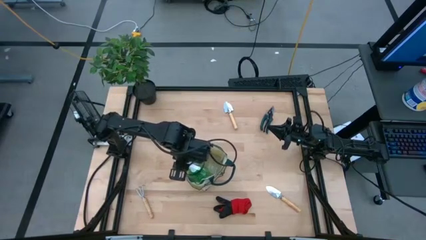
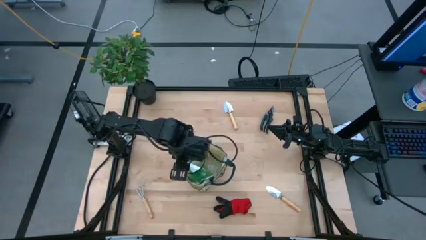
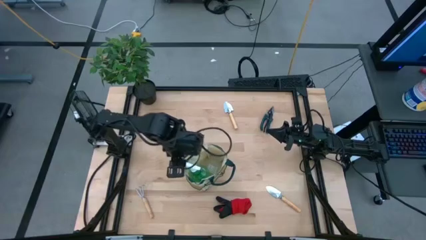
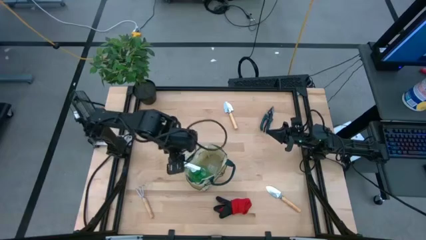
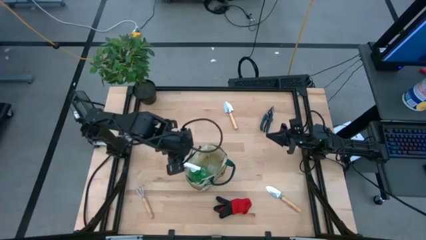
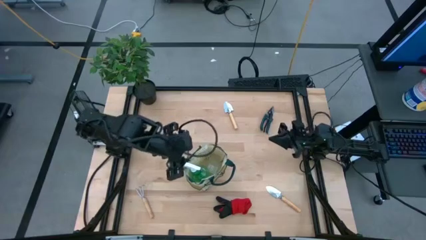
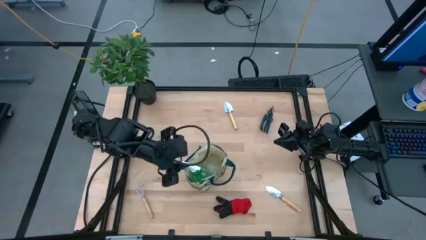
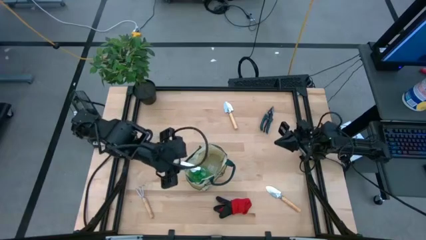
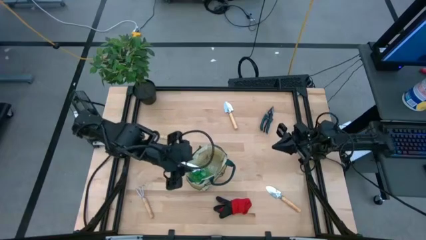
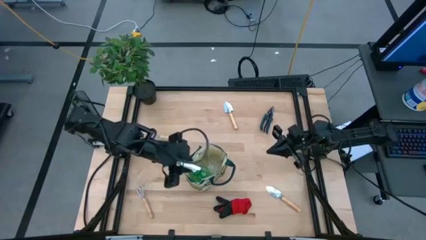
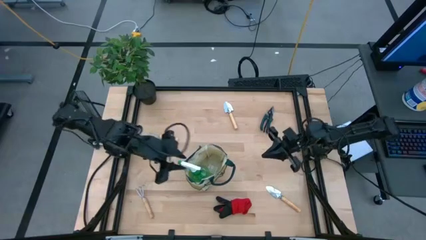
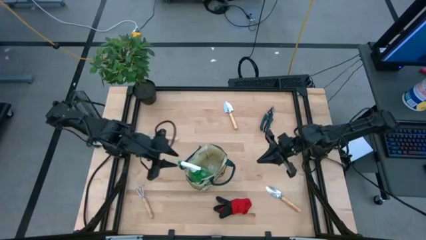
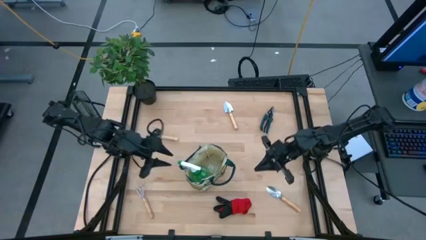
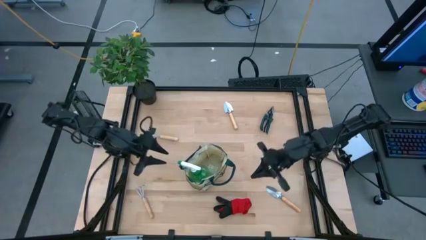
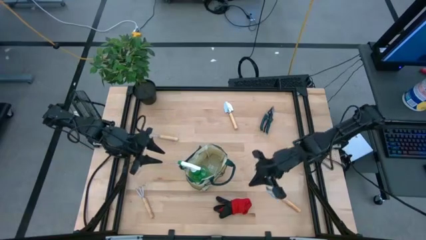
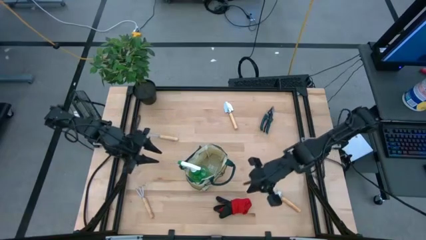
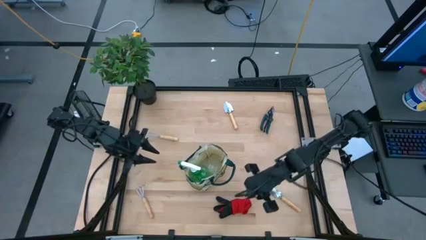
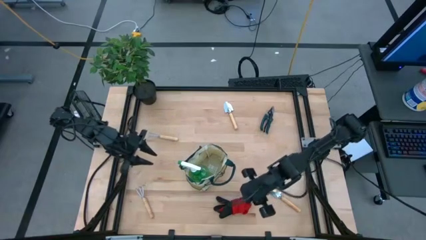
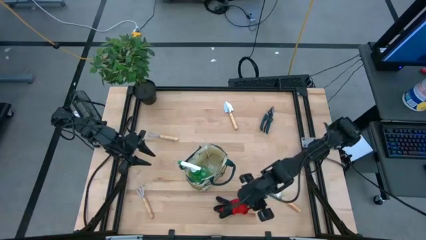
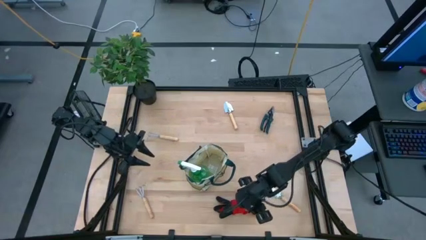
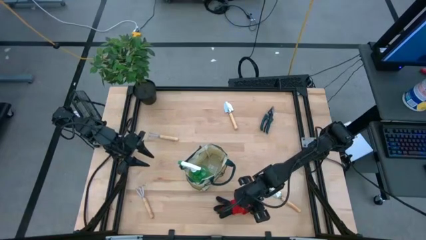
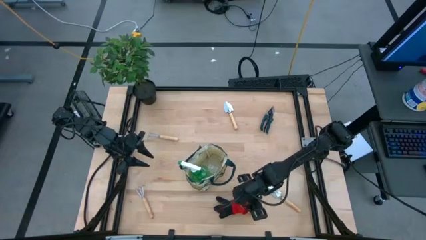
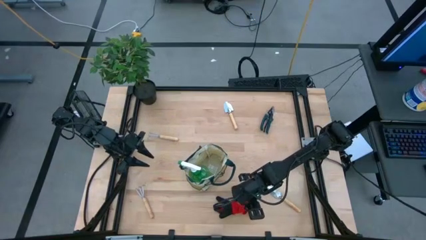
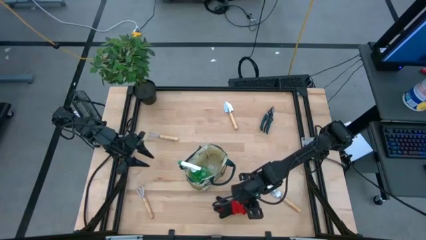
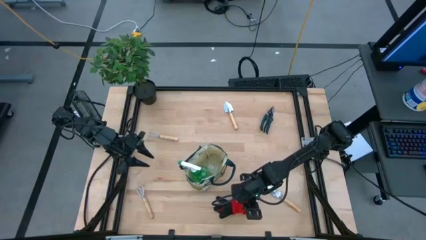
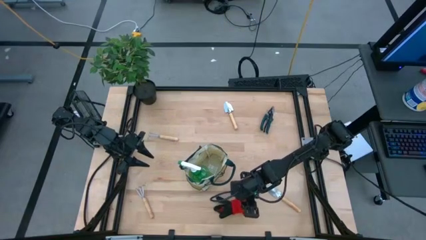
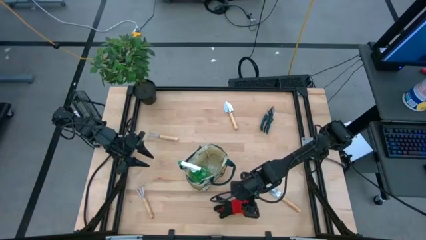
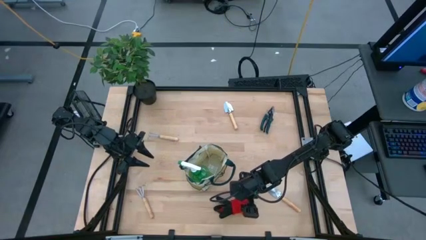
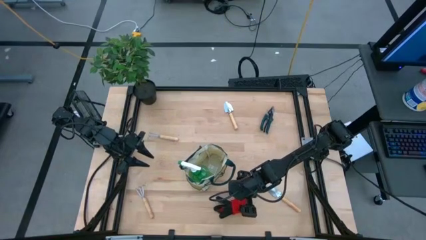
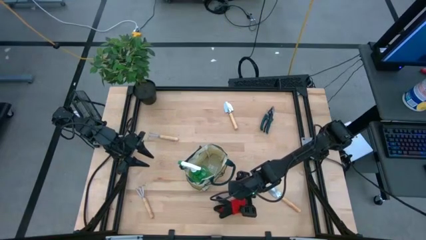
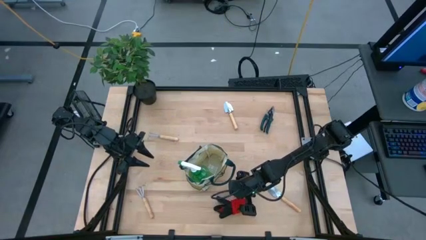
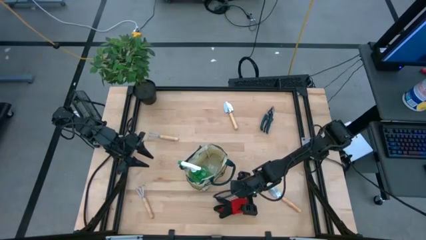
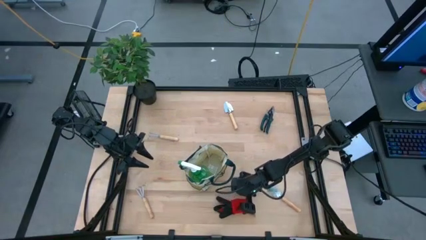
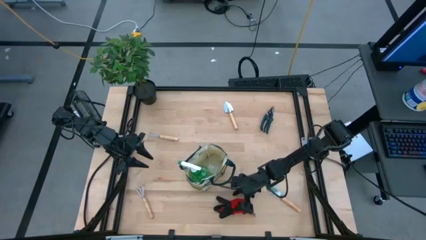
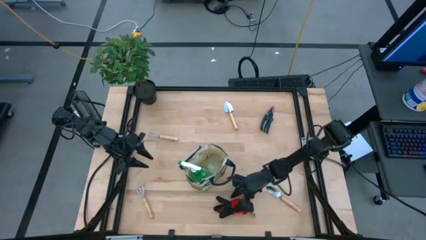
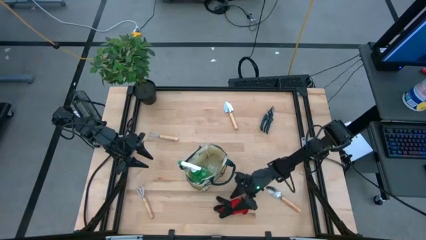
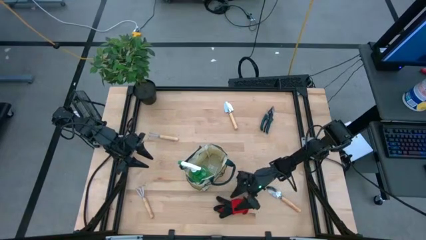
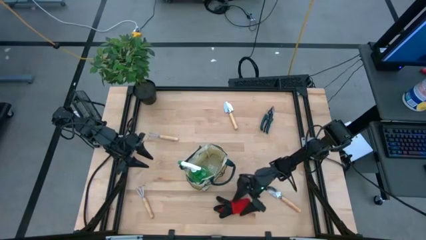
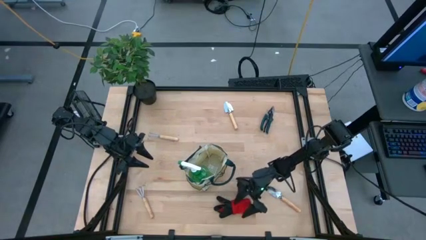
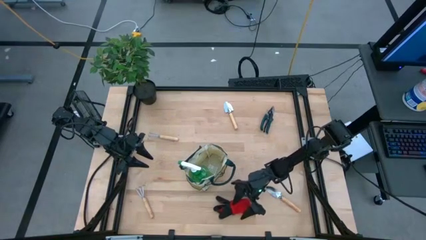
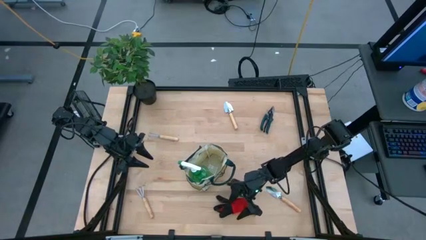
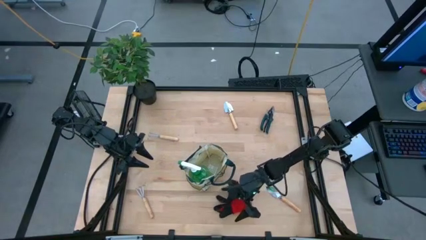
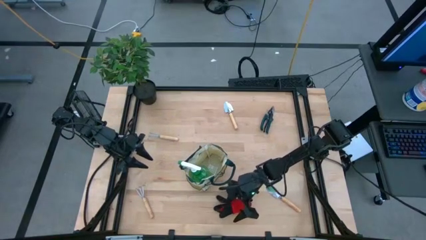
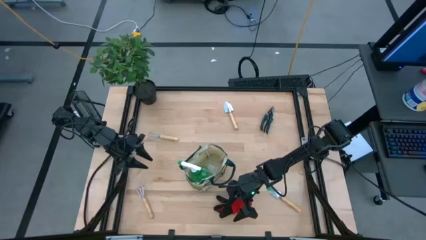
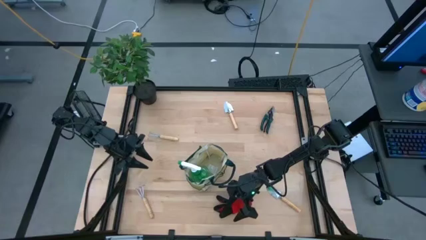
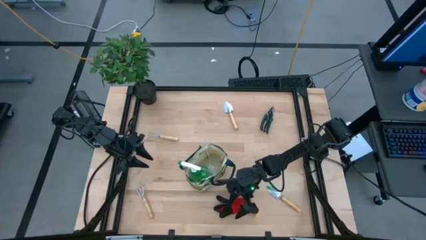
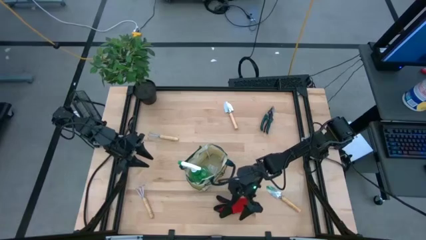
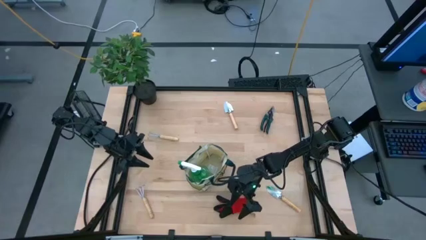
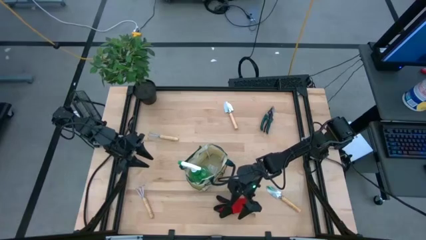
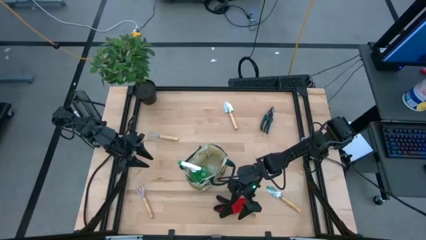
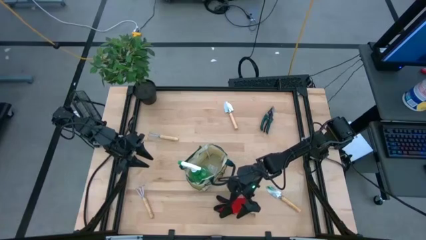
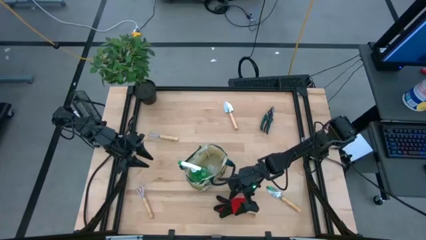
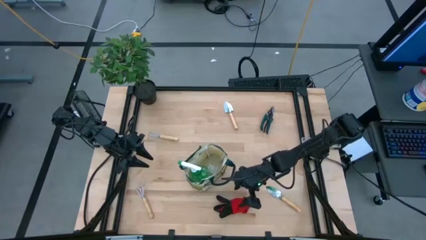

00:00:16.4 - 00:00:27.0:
Task: Pick & Place Garden tools in Gardening bag
Put the gloves into the gardening bag

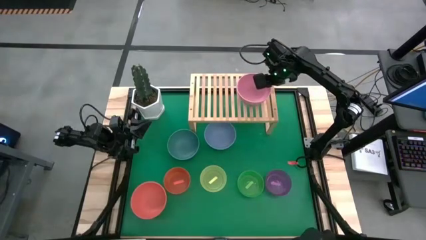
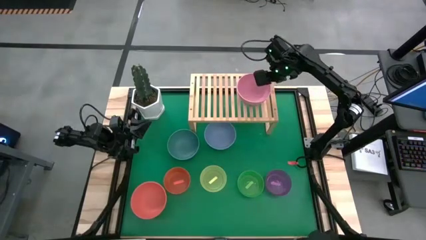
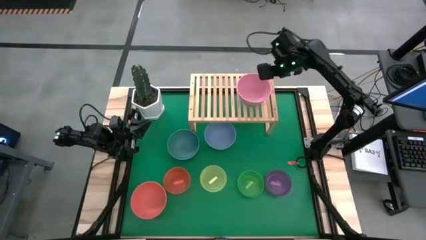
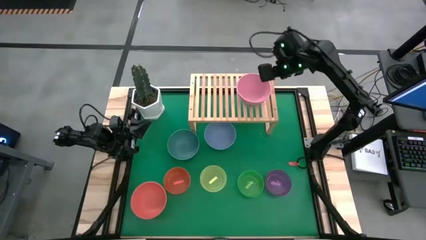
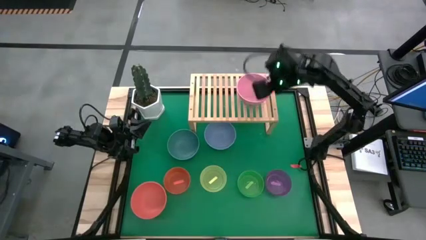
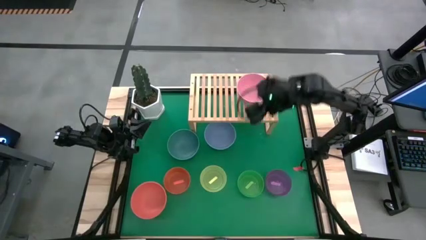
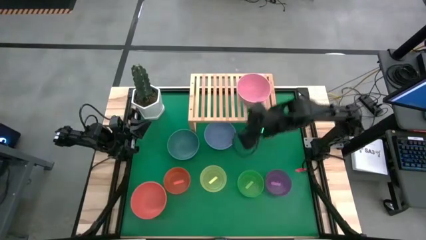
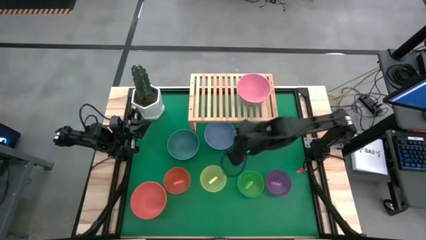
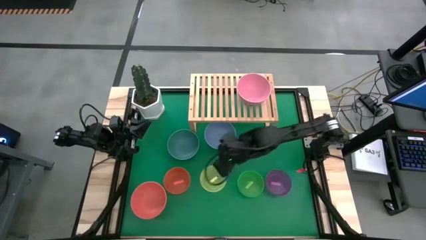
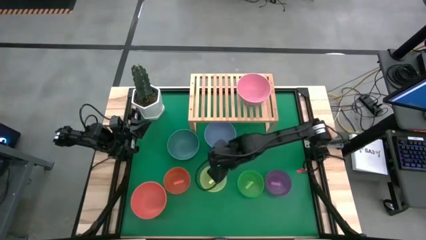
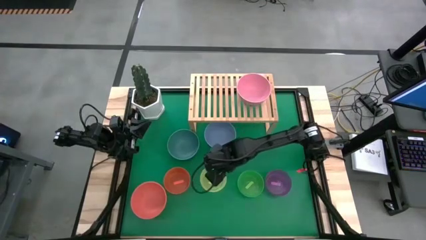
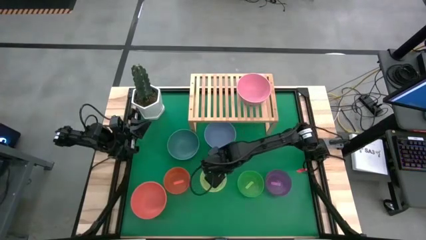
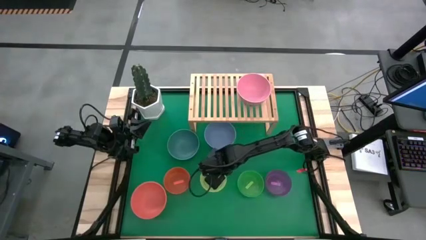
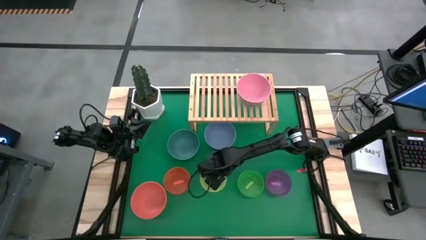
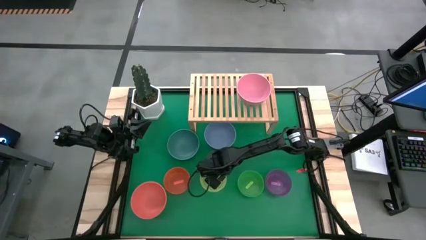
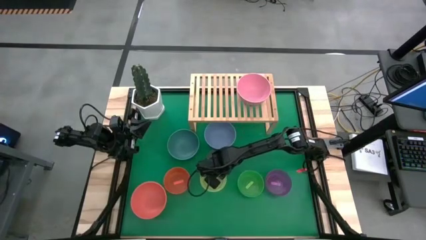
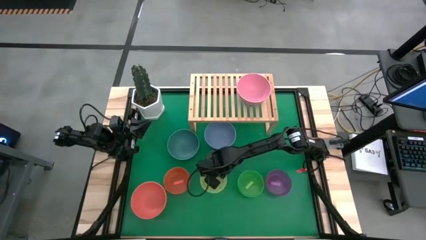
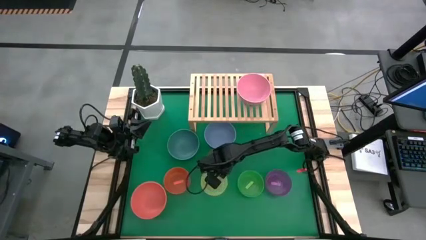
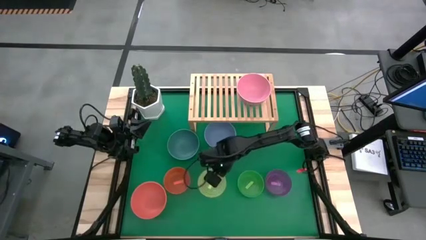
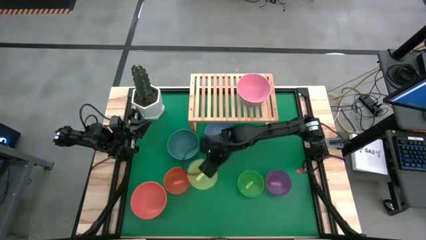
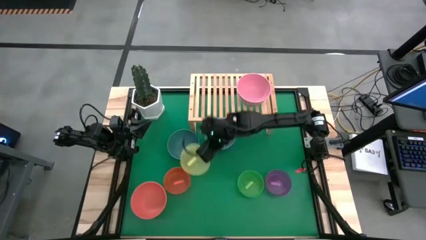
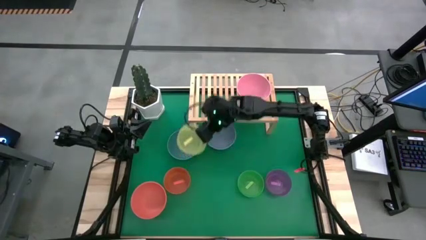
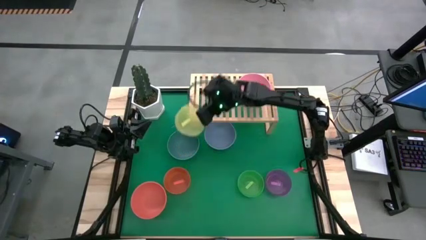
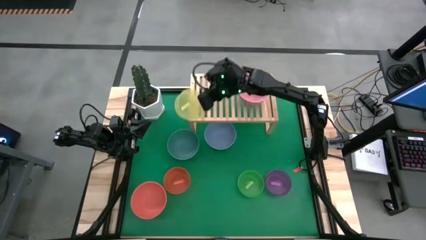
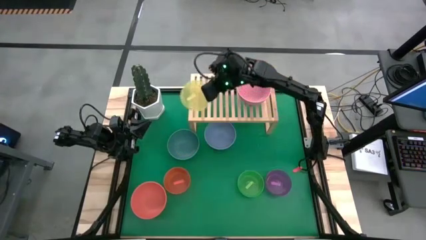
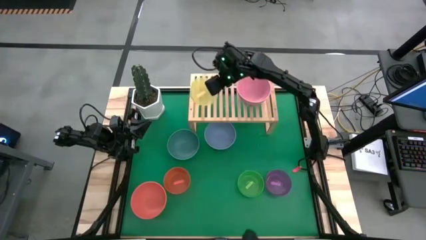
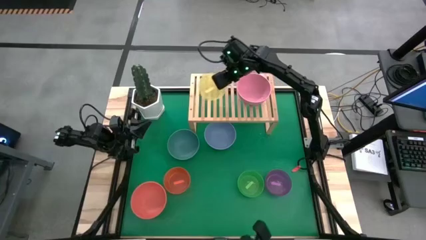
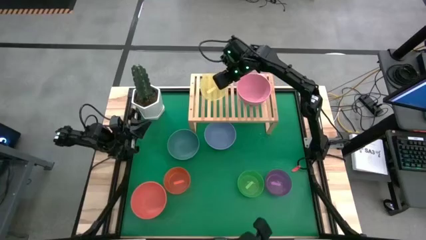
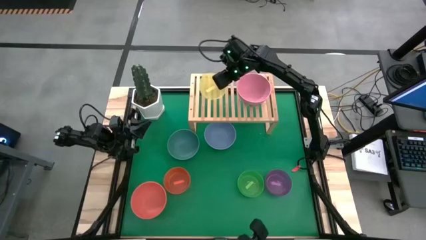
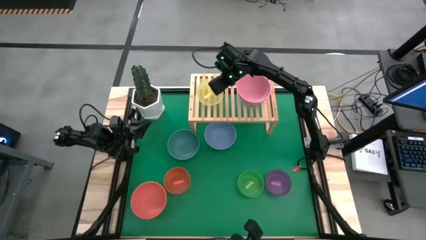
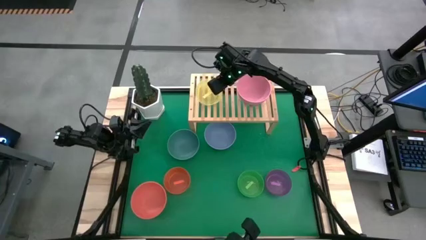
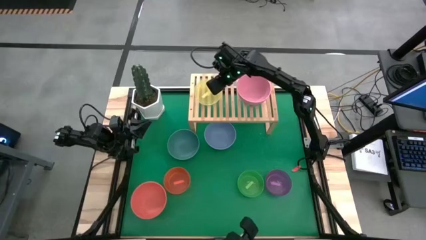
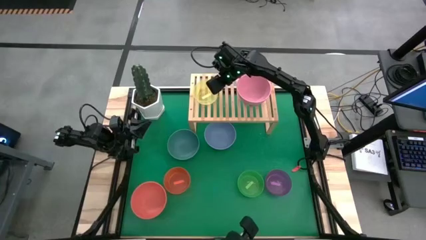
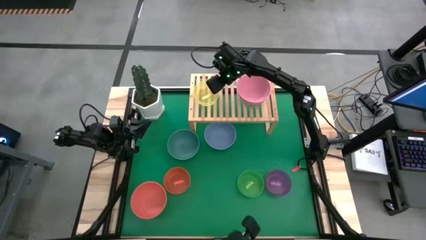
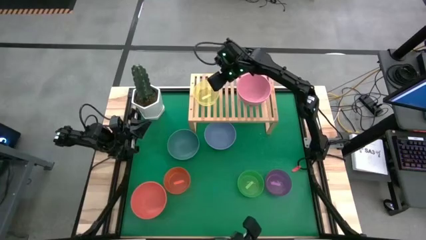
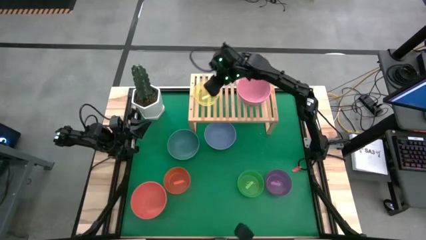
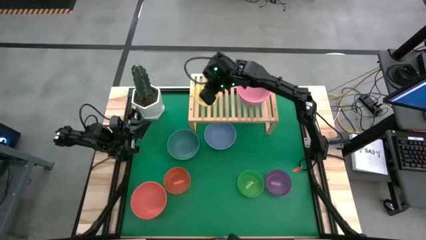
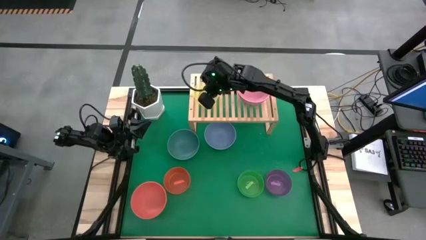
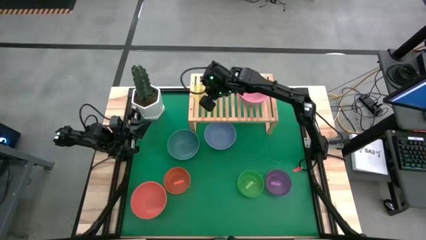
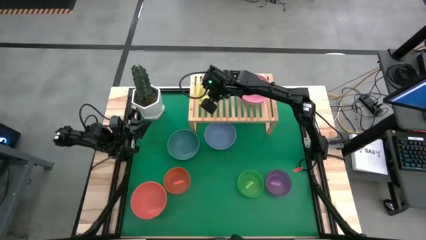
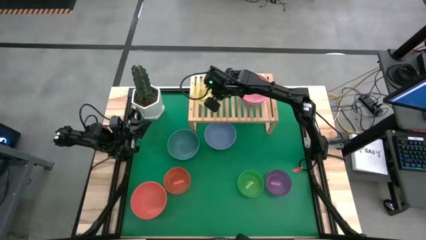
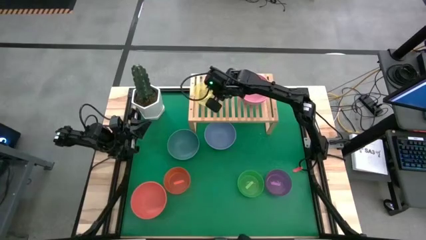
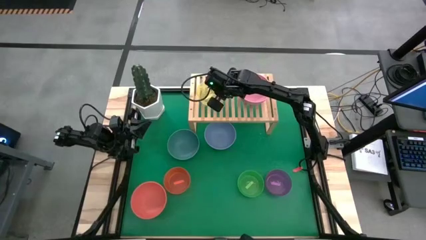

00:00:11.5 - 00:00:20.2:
Task: Place and stack bowls onto a shelf
Put the yellow bowl on the shelf
